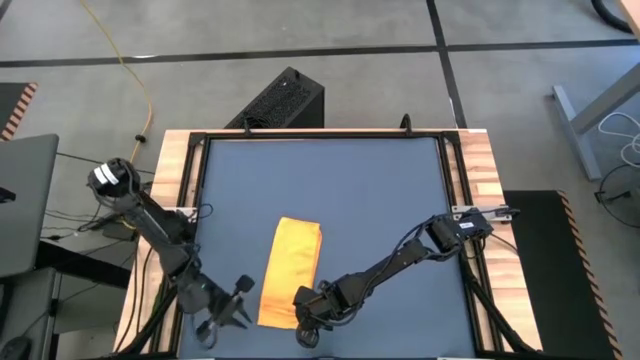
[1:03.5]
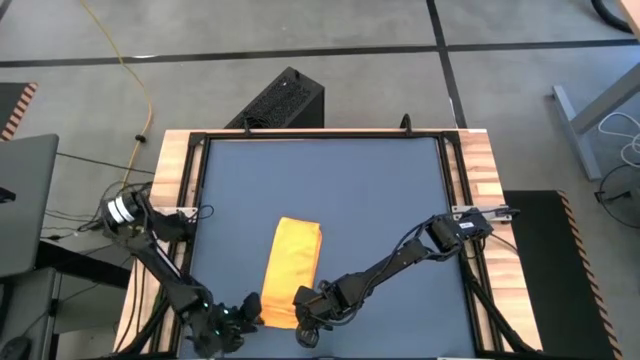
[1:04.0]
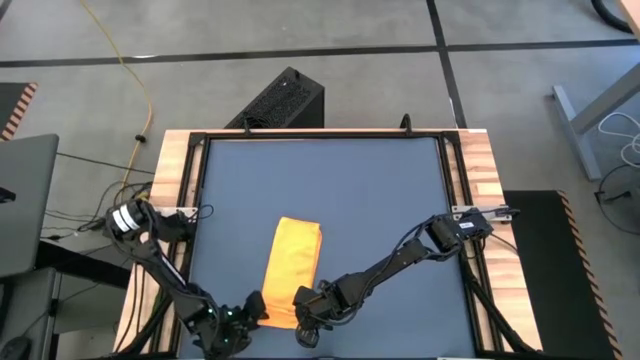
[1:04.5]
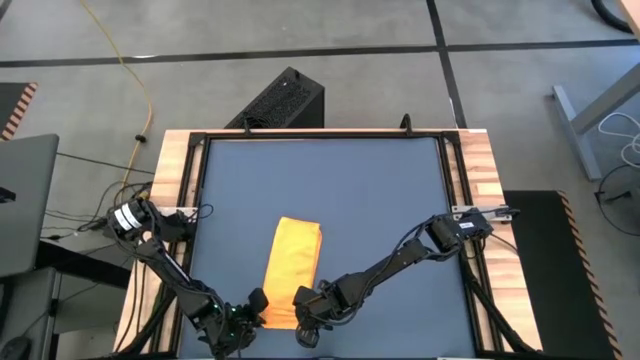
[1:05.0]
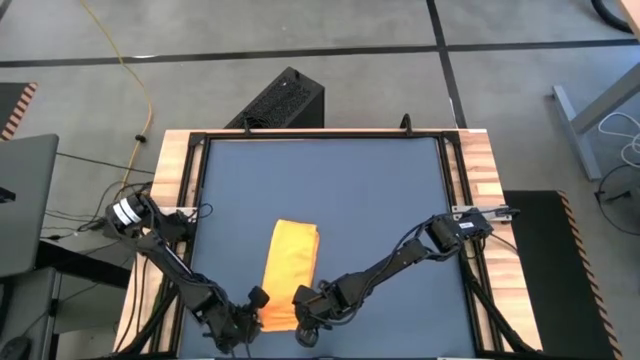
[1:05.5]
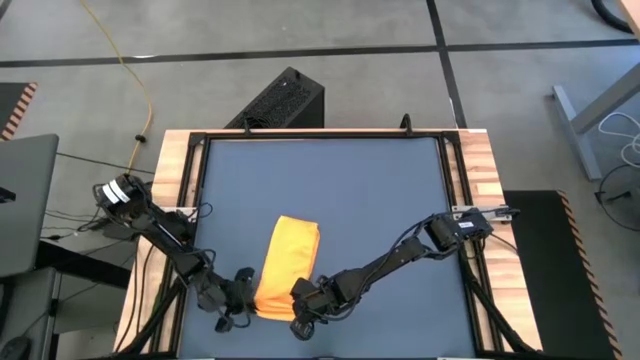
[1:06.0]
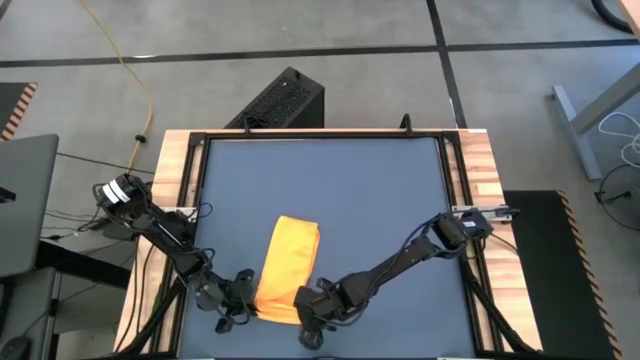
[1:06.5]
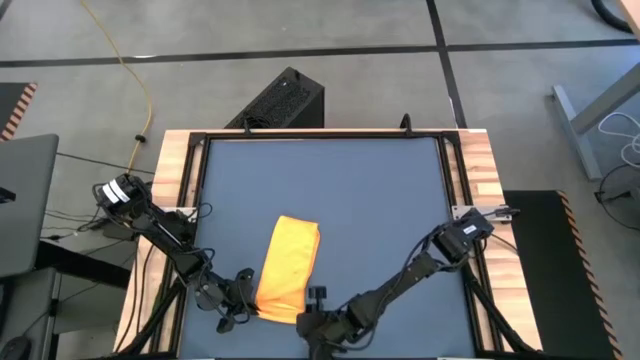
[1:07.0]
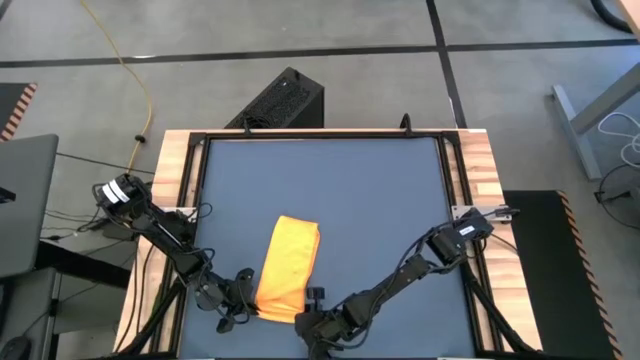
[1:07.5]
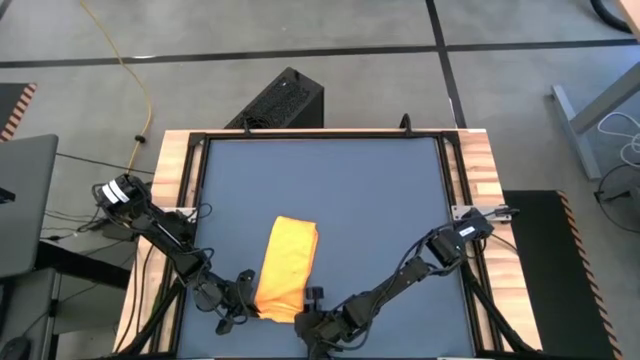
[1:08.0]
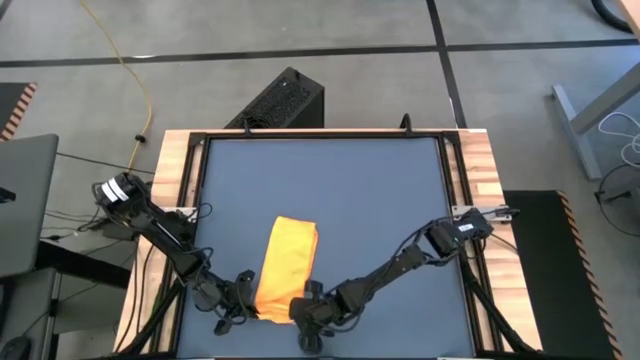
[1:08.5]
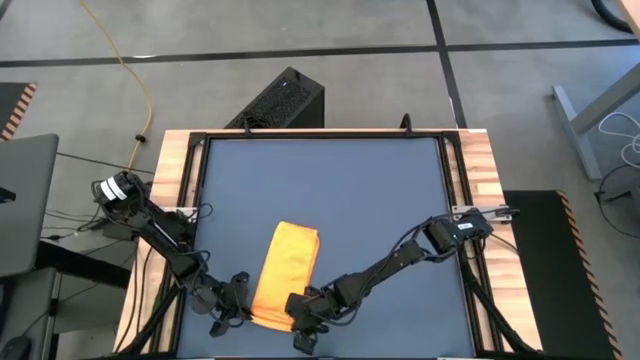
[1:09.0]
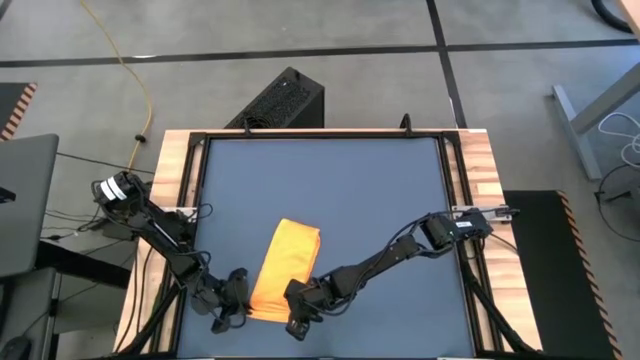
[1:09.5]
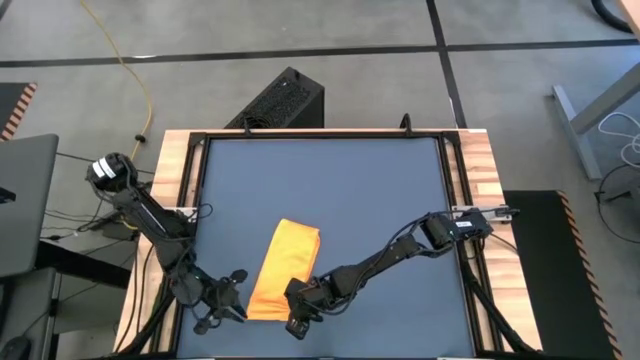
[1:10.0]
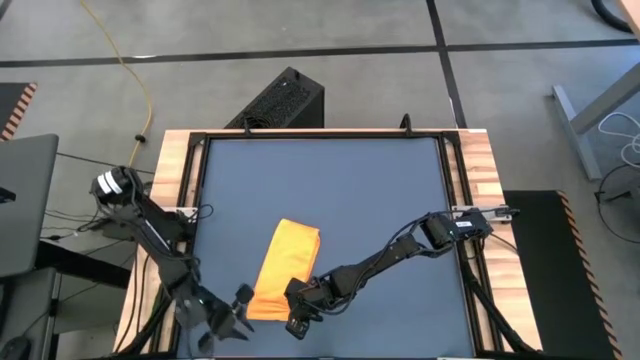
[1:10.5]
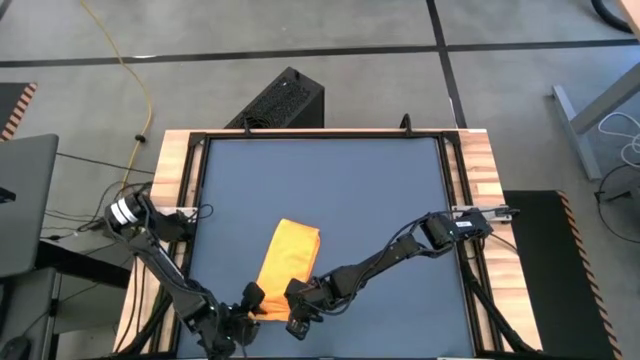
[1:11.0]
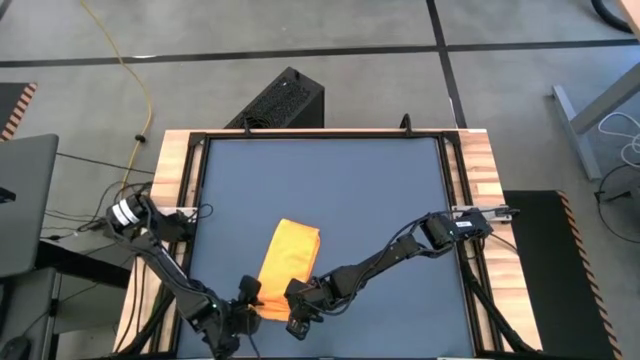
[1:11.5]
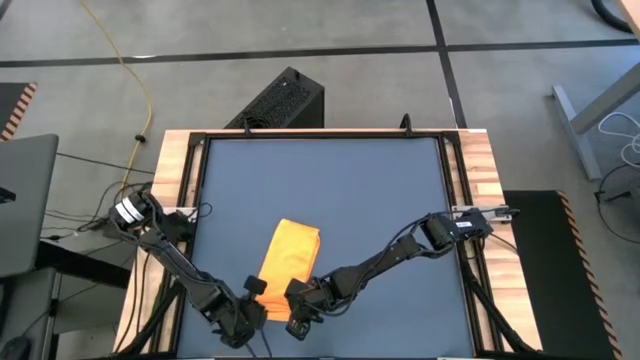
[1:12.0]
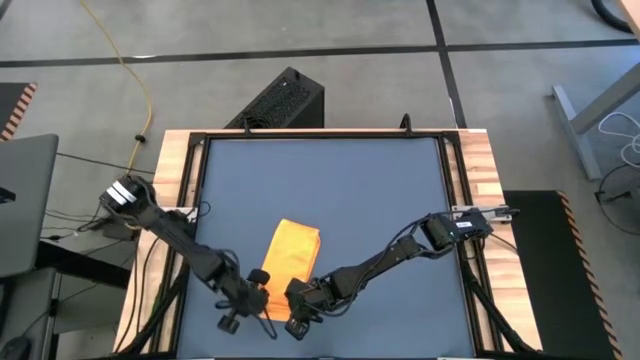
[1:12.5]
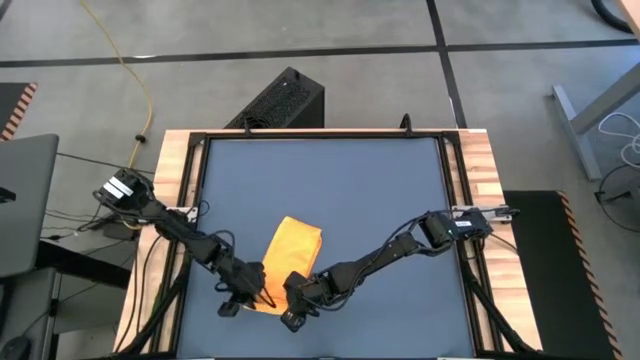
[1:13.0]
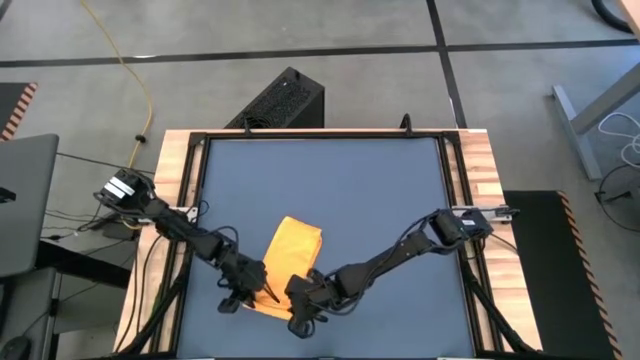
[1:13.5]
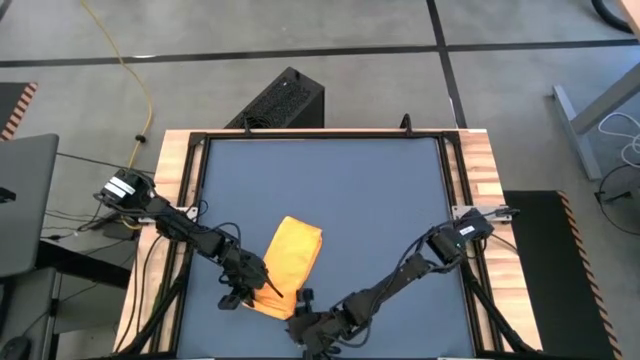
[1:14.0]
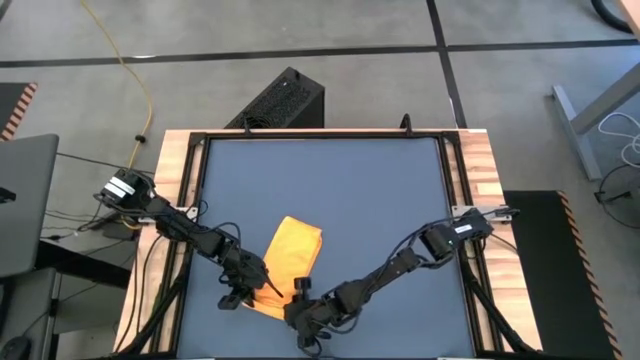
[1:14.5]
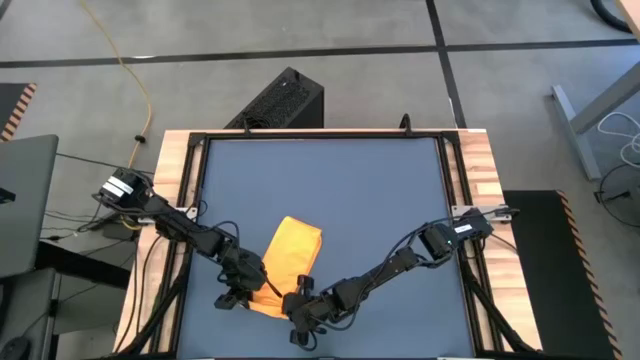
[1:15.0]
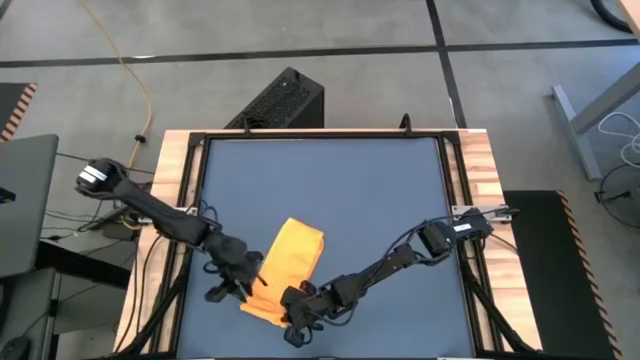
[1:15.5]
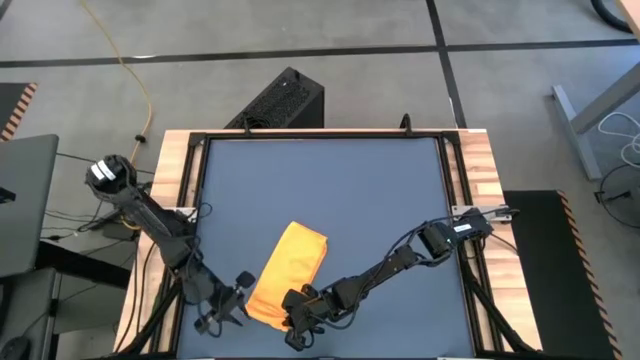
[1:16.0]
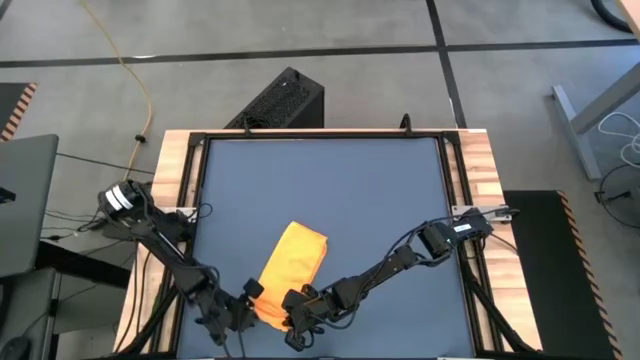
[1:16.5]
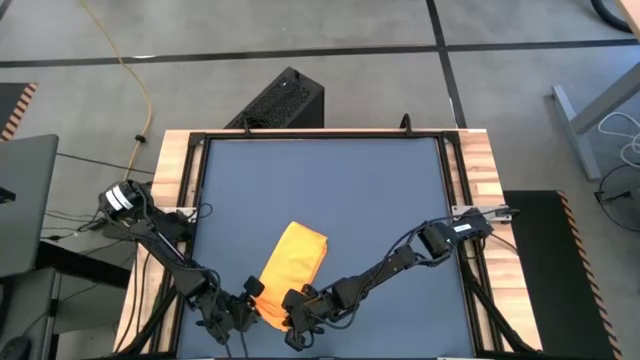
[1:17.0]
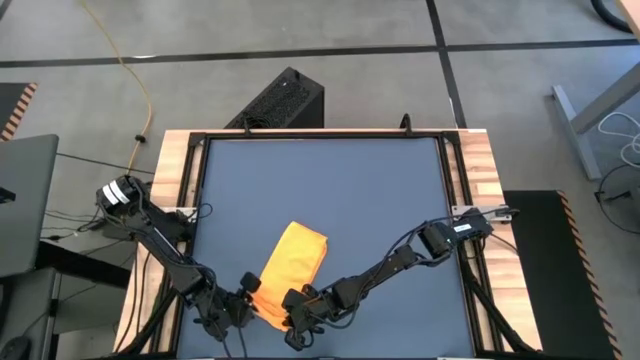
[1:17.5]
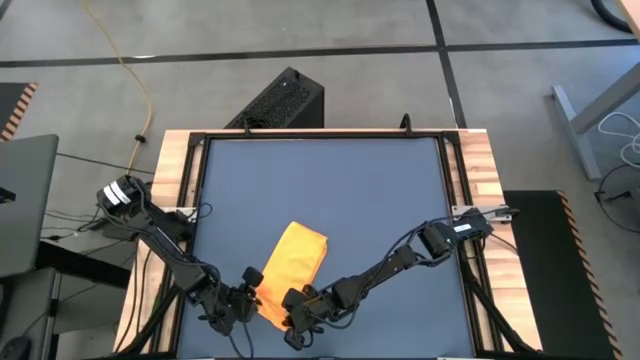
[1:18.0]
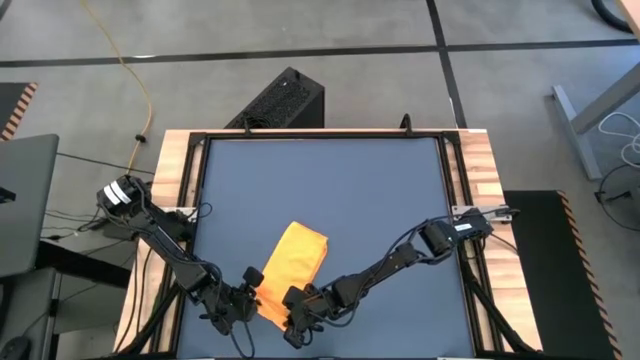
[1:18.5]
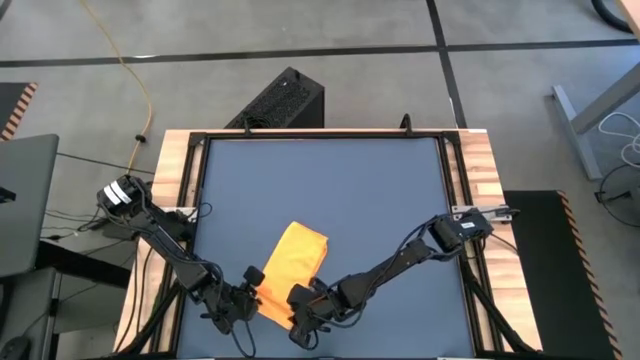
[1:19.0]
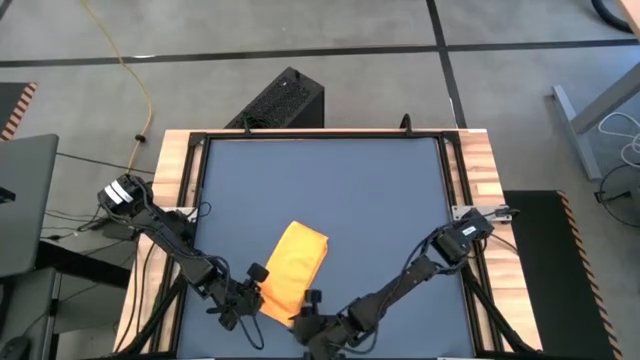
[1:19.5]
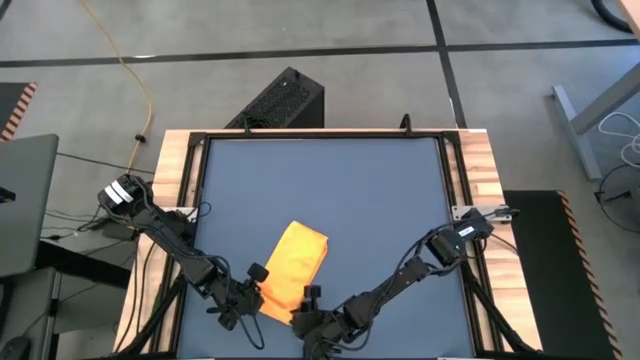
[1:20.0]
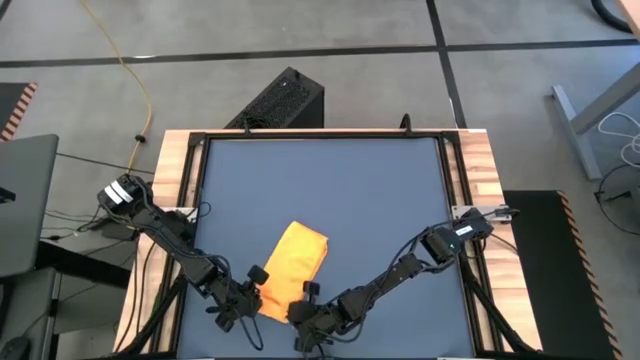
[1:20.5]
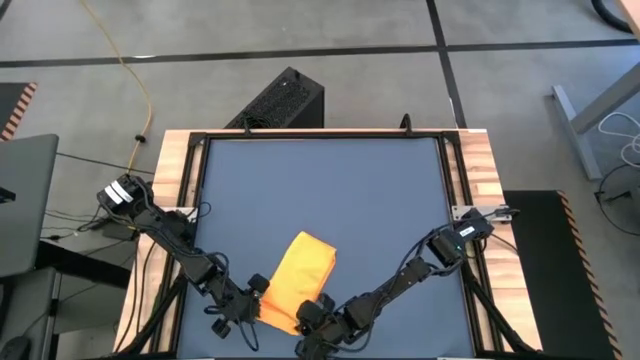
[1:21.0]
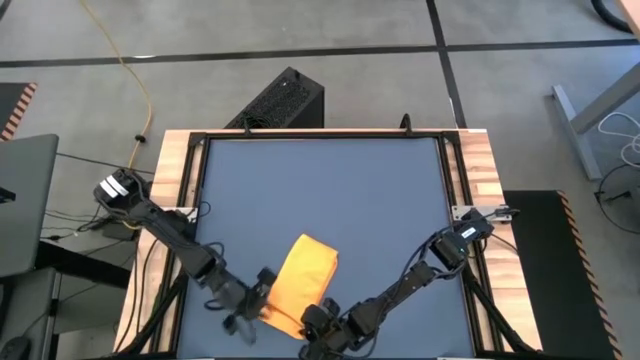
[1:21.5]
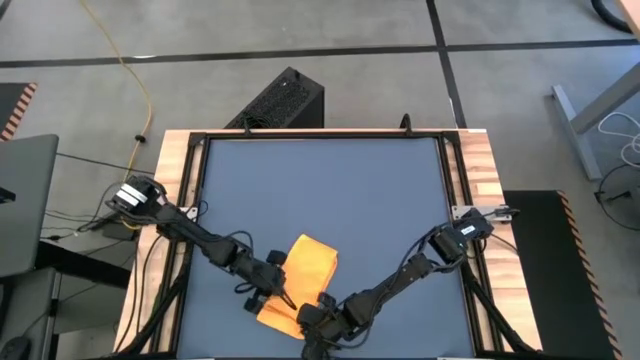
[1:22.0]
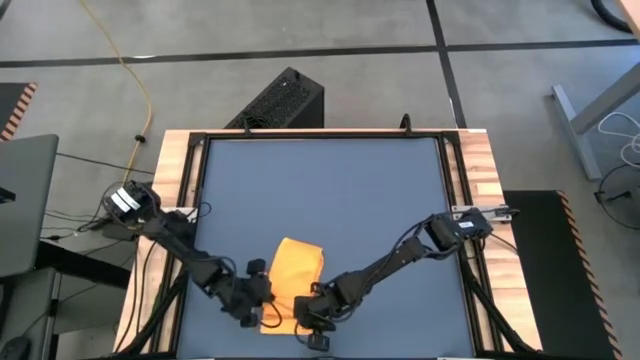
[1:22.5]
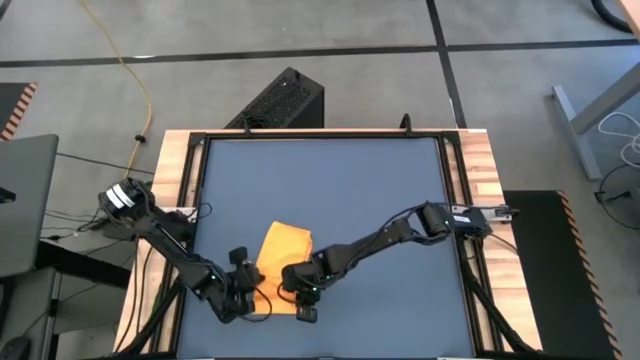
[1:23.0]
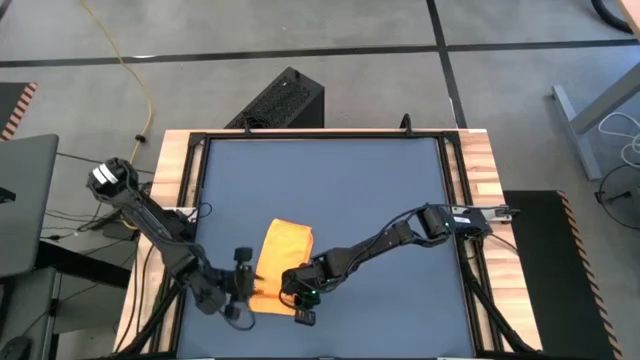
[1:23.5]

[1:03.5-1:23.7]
Task: Roll towel
Roll the yellow microfiber cloth on the table

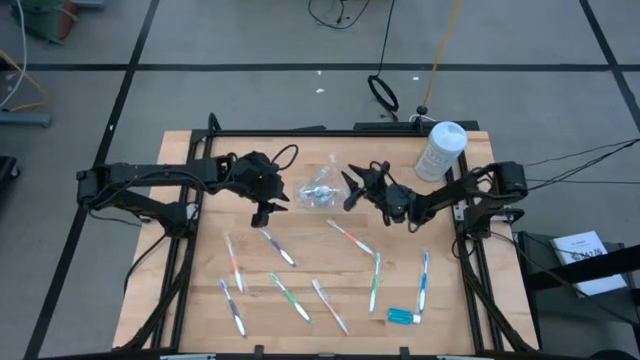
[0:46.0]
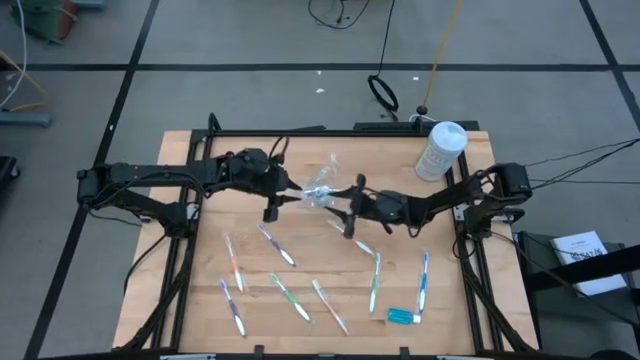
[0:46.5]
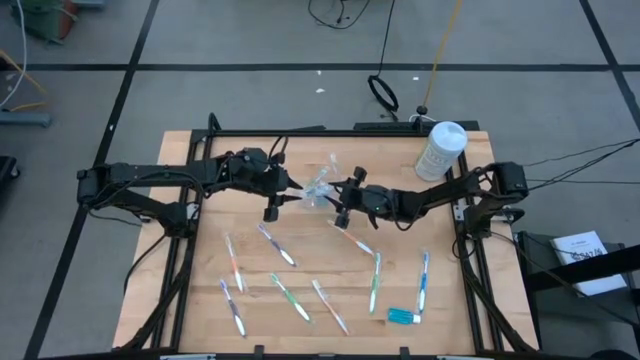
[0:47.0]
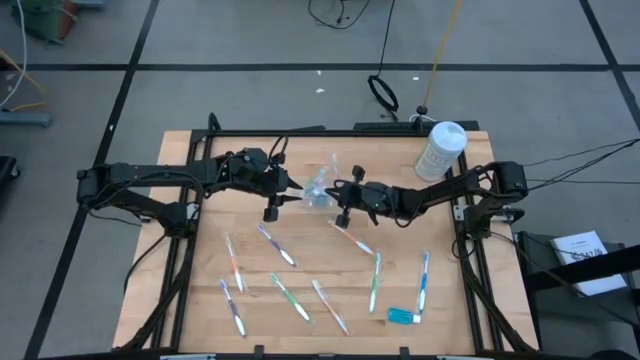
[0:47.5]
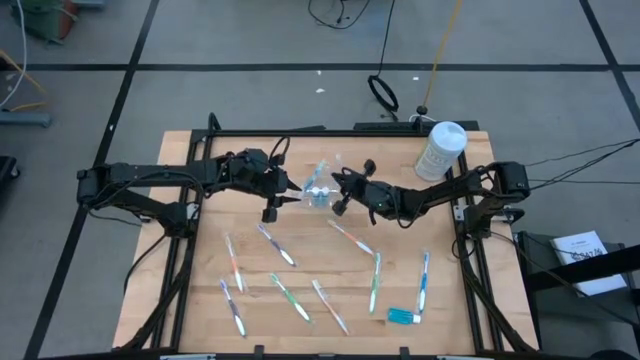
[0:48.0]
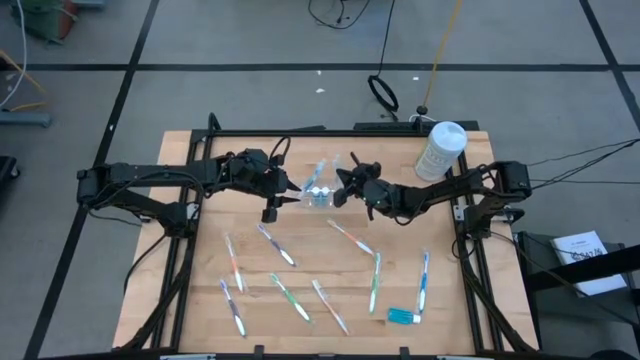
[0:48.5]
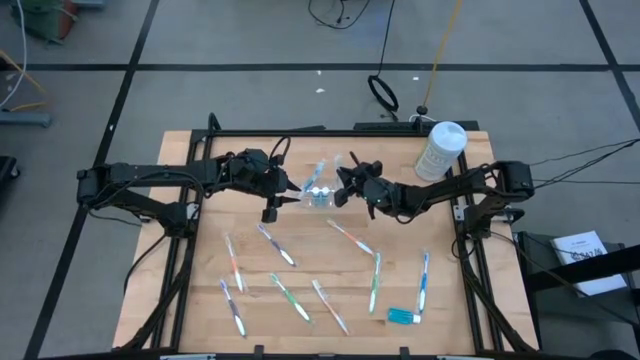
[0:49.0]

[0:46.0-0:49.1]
Task: Pick & Place Toothbrushes
Adjust the green toothbrush in the transparent organizer
